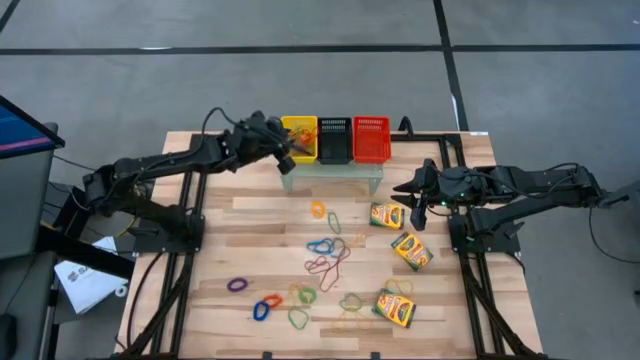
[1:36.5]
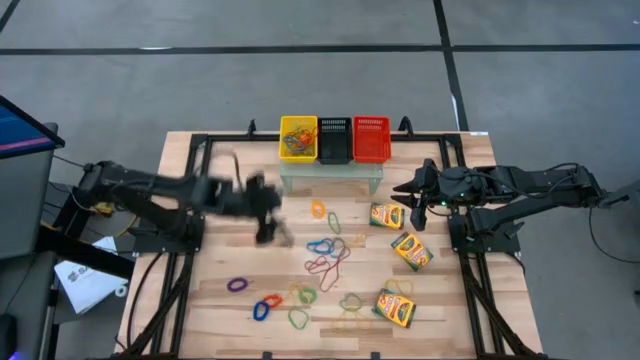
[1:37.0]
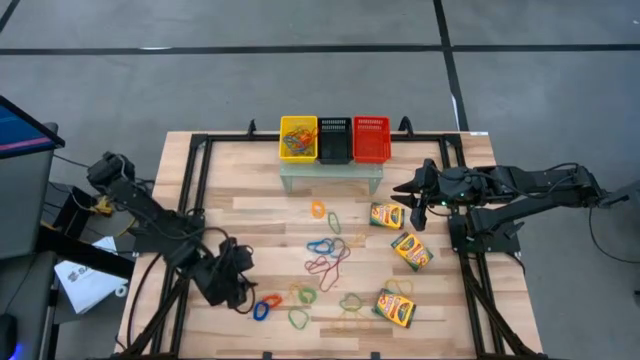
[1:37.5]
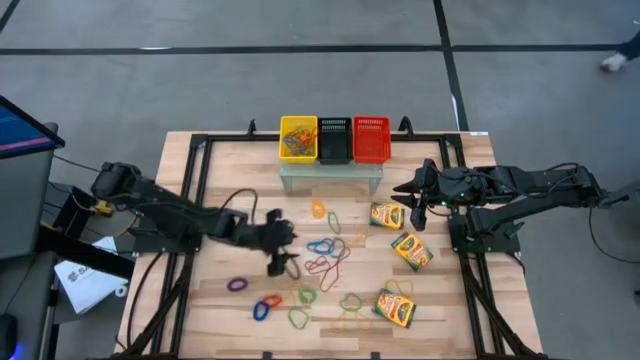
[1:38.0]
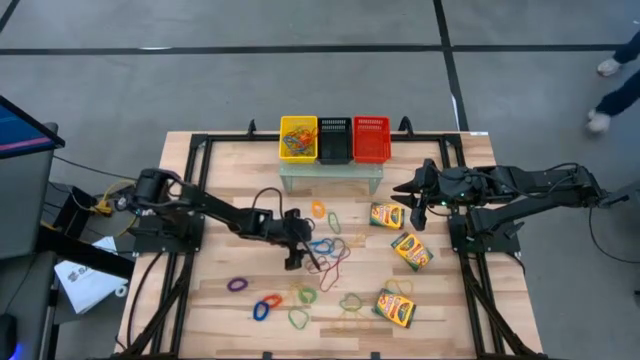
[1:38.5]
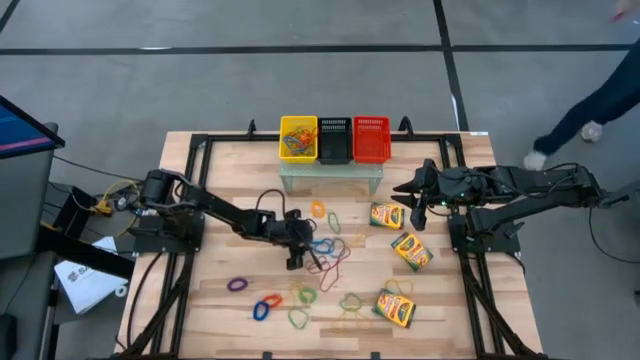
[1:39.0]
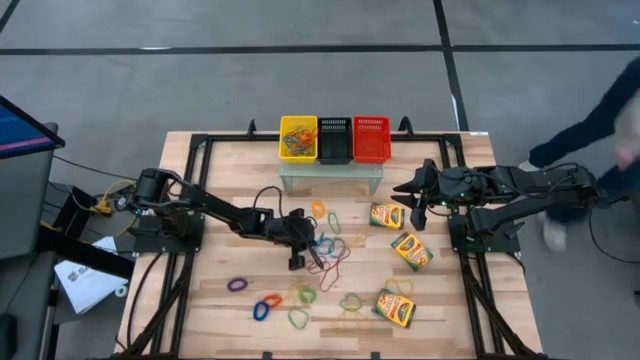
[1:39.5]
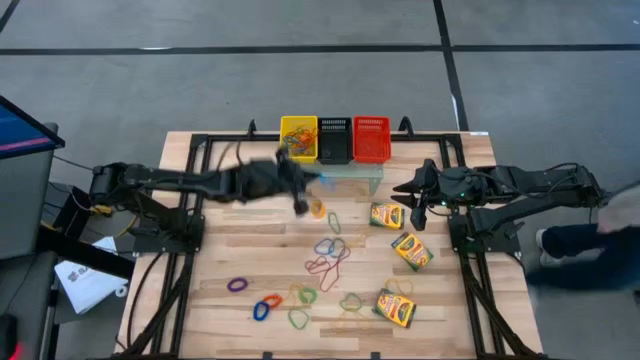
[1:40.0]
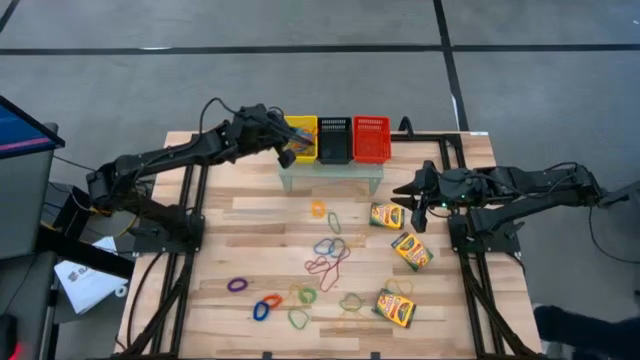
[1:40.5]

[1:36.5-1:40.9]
Task: Pick & Place Office Desk Supplies
Put the left small blue rubber band into the yellow bin on the shelf

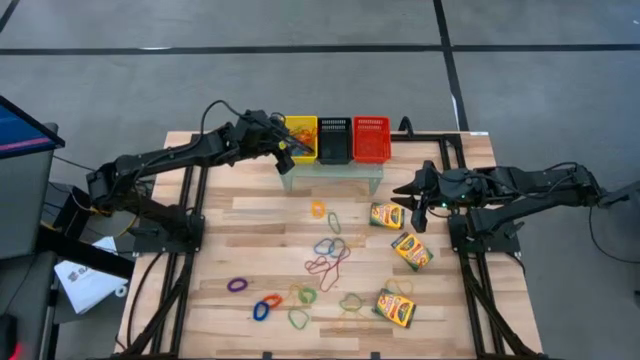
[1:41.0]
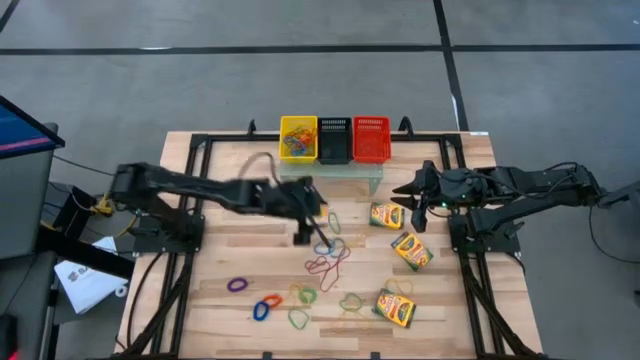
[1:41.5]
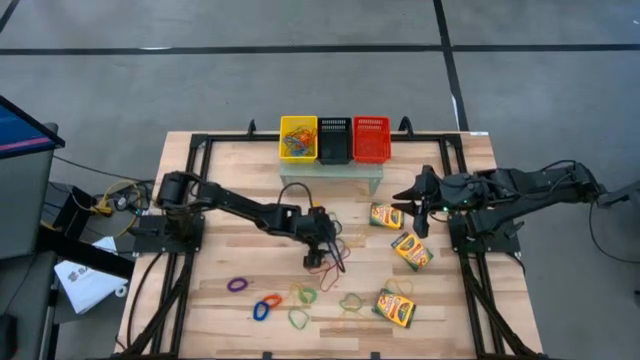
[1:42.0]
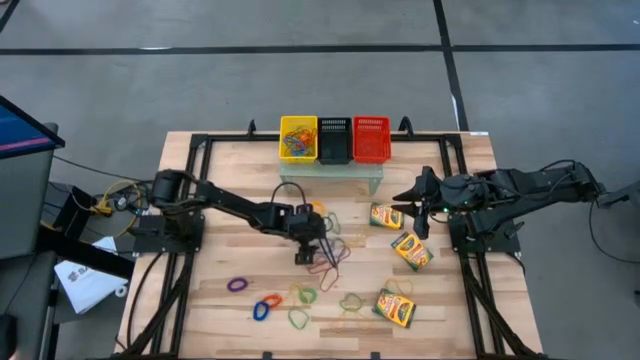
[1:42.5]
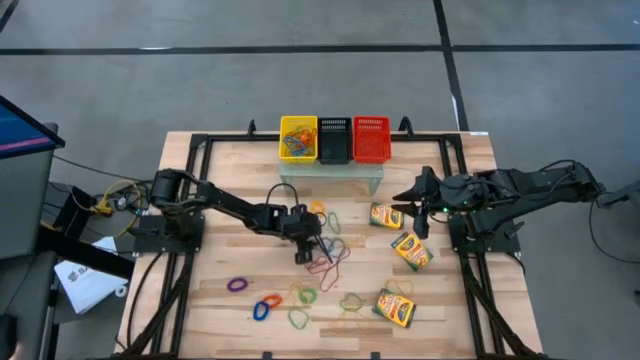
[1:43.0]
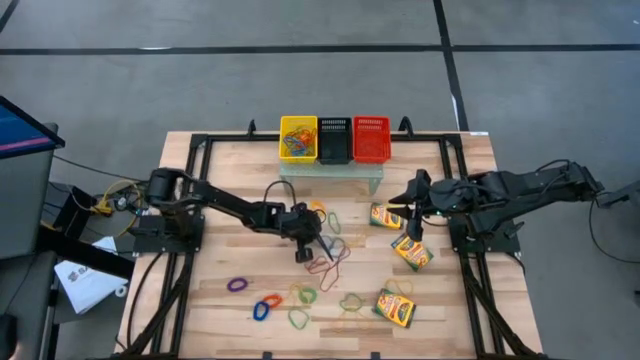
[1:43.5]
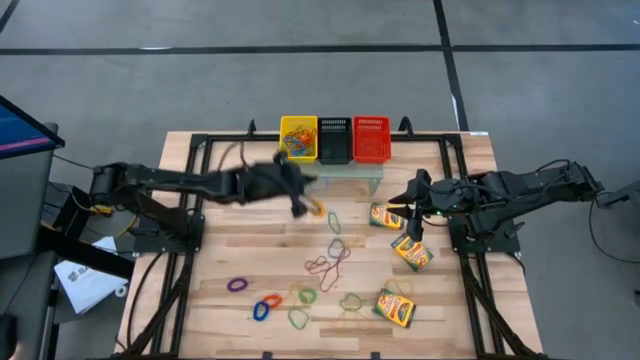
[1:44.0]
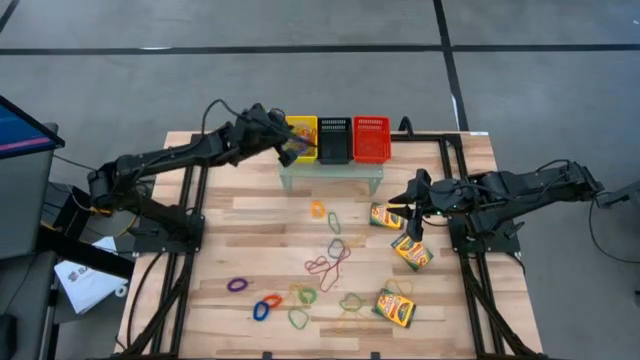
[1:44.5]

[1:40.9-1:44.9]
Put the left small blue rubber band into the yellow bin on the shelf

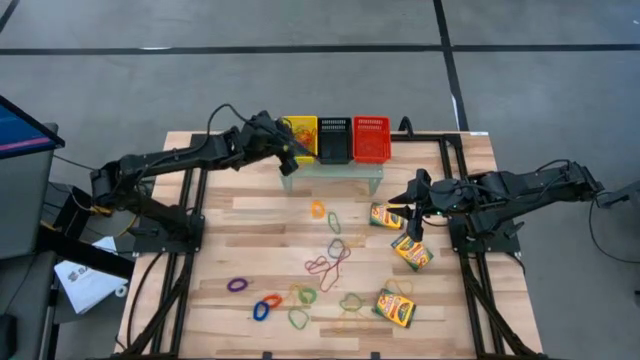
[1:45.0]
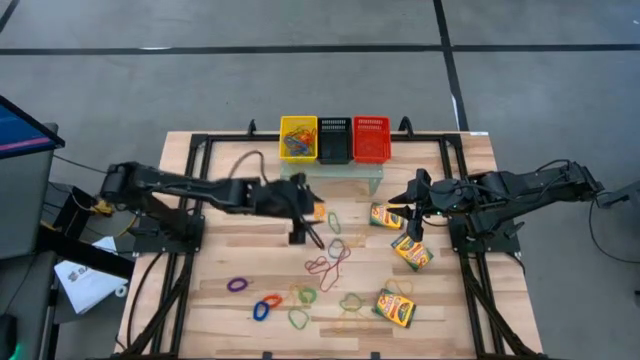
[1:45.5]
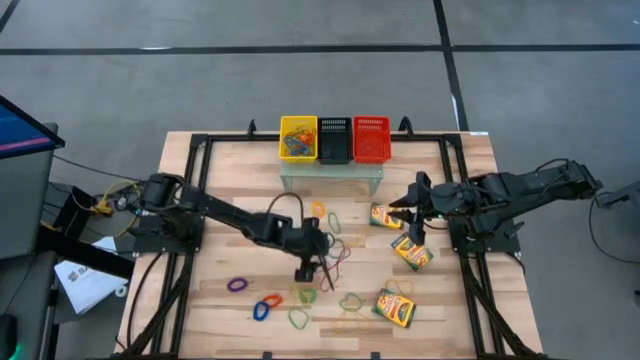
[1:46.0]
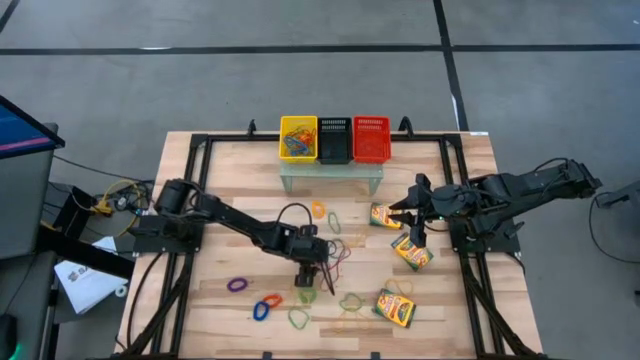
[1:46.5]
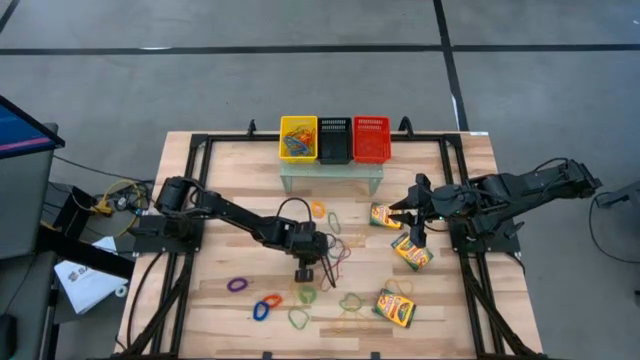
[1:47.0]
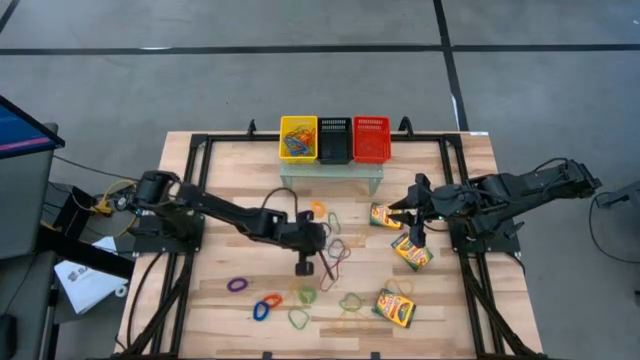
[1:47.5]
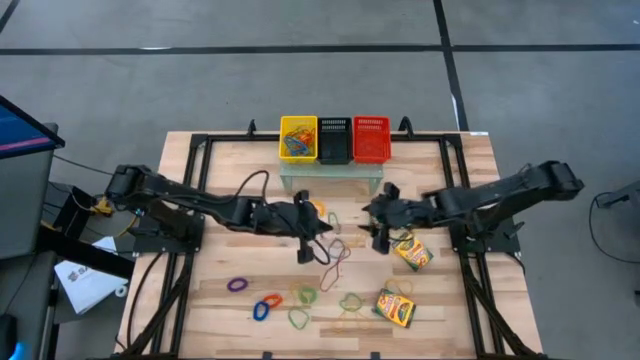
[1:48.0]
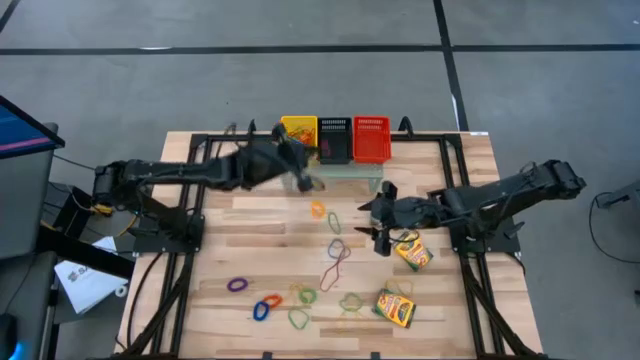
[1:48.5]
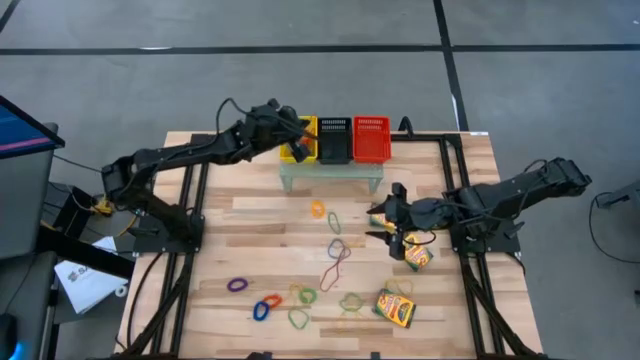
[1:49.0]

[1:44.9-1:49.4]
Put the left big red rubber band into the yellow bin on the shelf

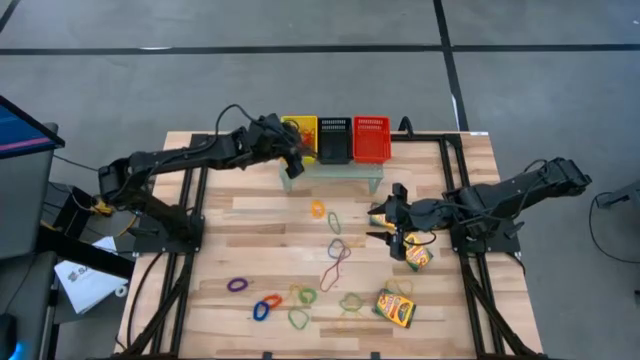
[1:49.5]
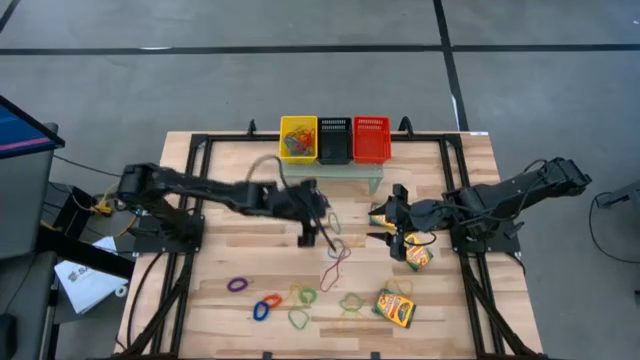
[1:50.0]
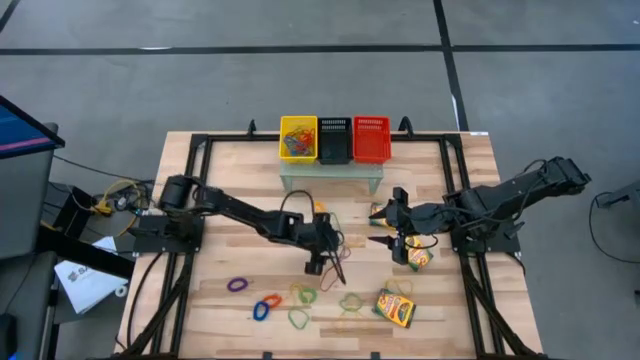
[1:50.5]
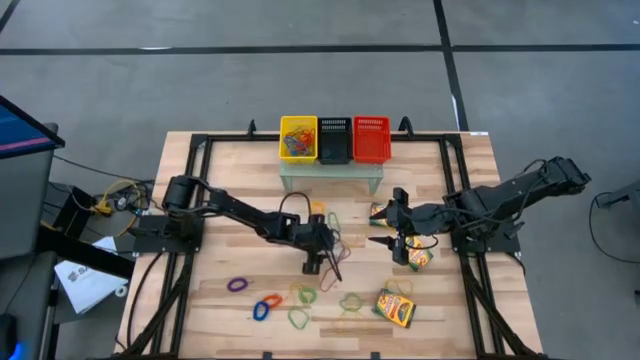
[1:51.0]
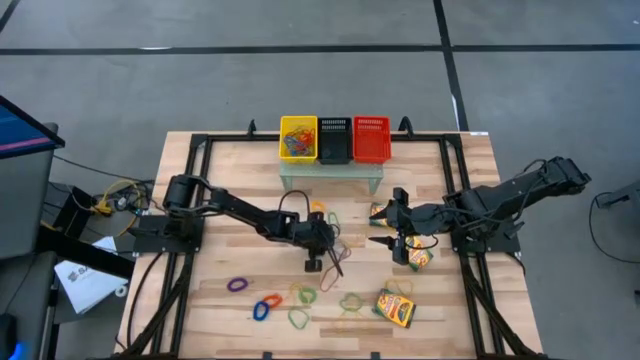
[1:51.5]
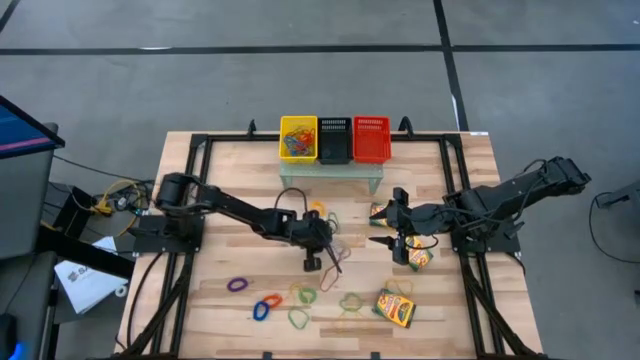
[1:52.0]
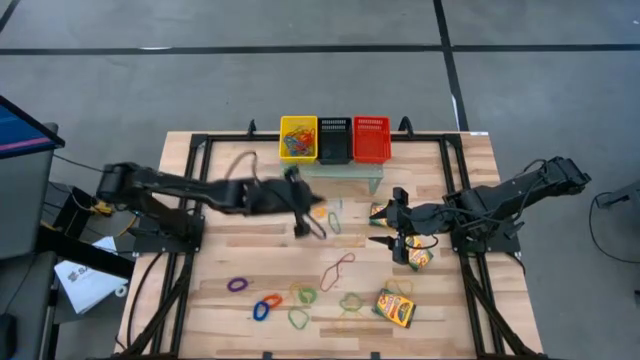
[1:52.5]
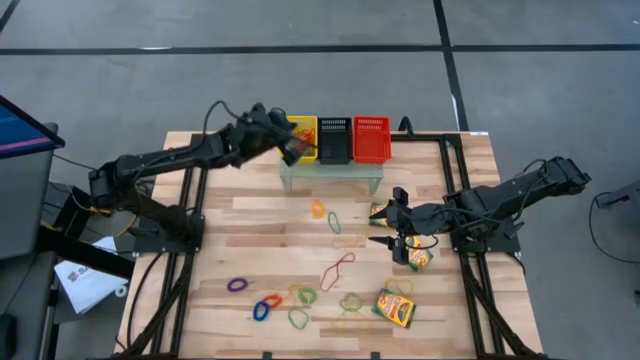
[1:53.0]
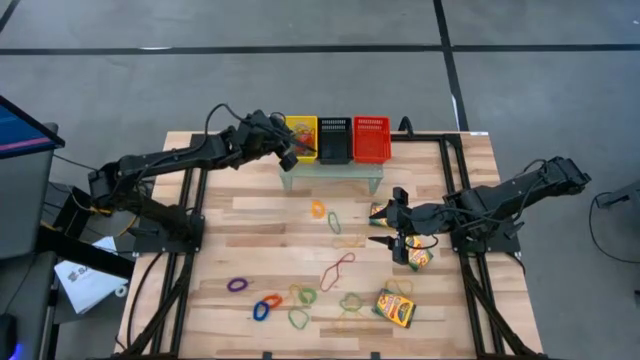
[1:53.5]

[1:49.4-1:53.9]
Put the small blue rubber band into the yellow bin on the shelf

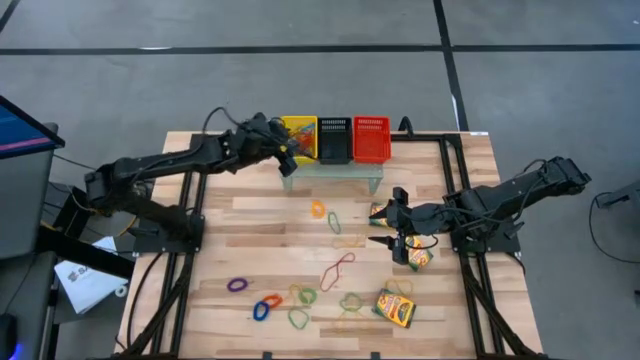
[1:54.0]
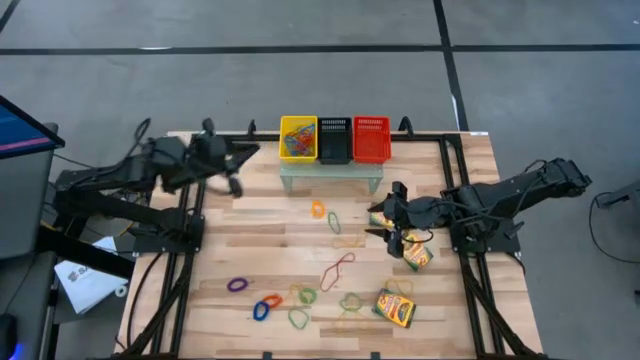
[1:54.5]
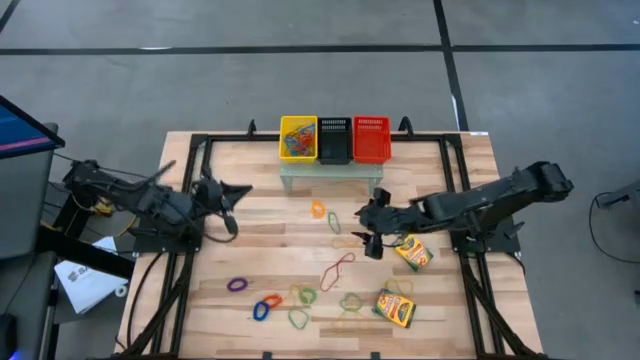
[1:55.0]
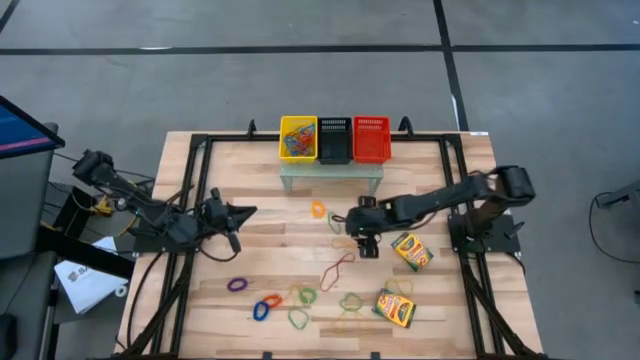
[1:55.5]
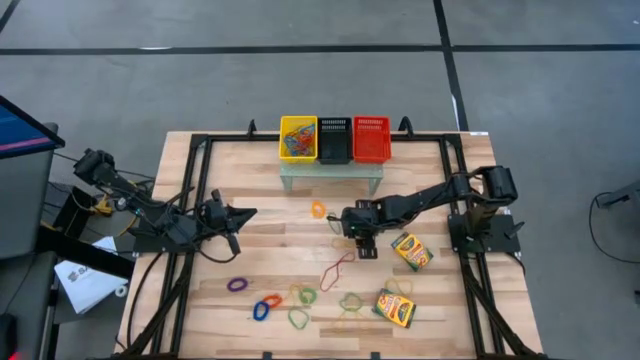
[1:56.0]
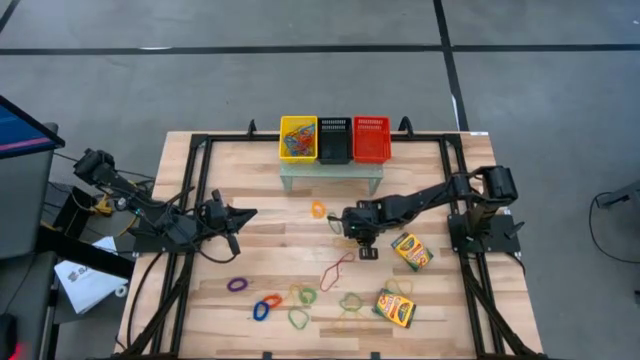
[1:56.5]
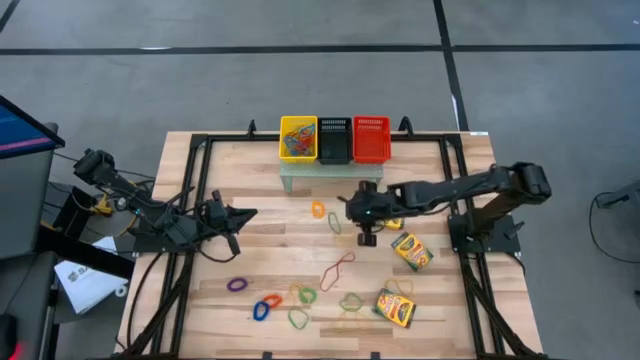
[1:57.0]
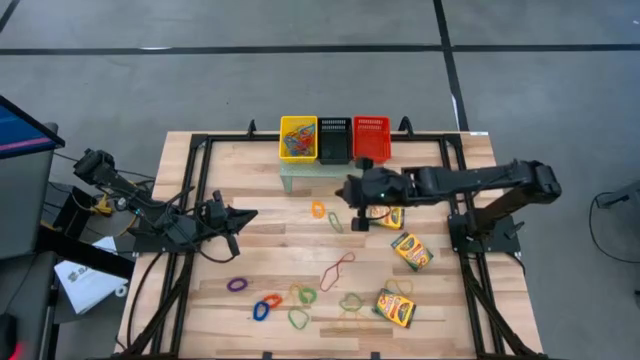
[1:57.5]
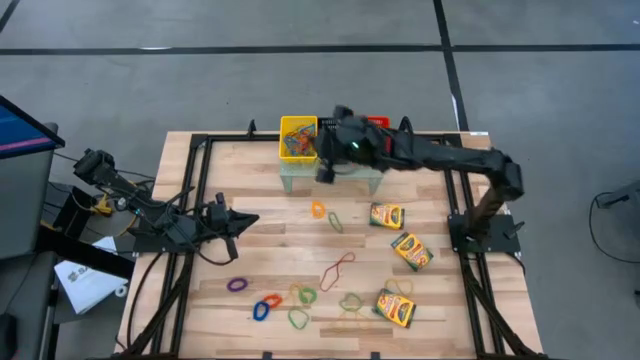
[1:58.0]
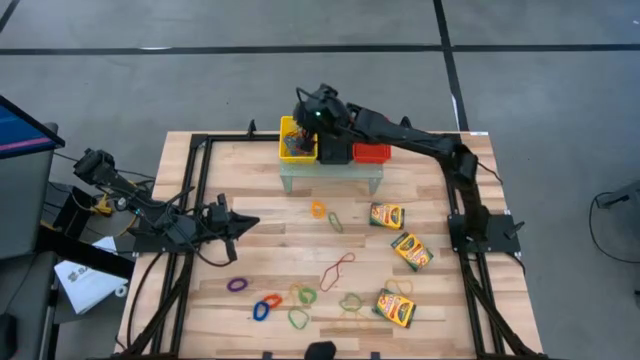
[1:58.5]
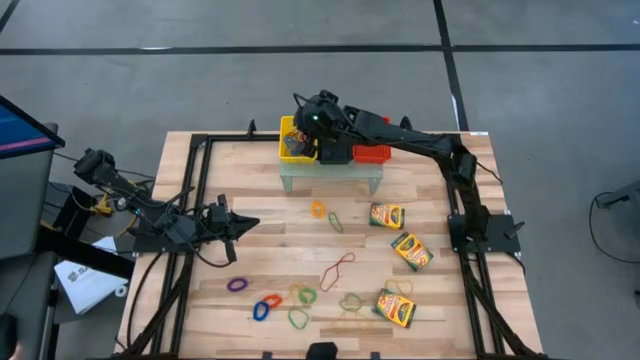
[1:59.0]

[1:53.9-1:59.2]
Put the top big yellow rubber band into the yellow bin on the shelf
